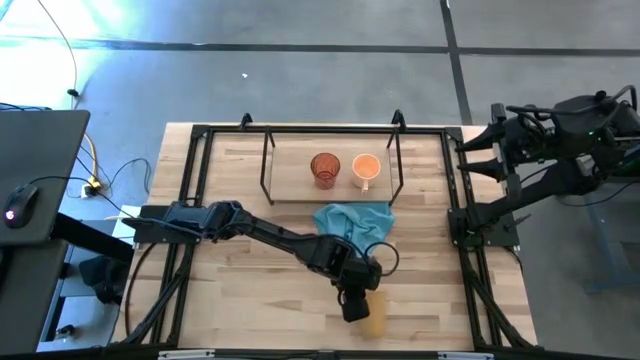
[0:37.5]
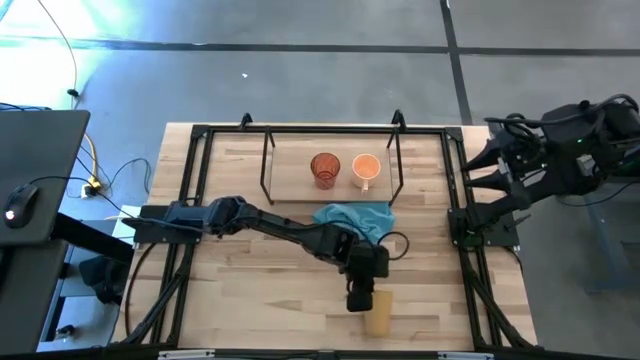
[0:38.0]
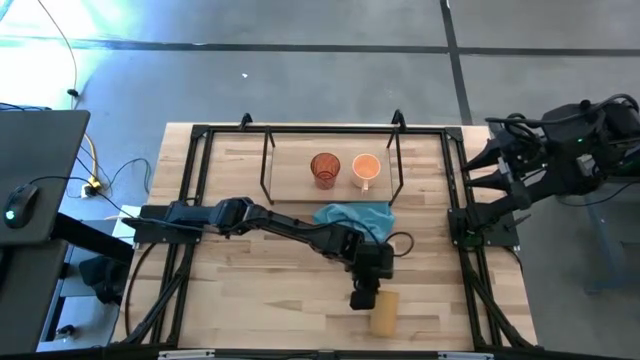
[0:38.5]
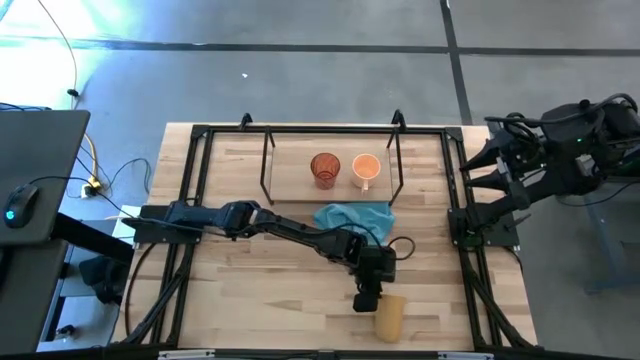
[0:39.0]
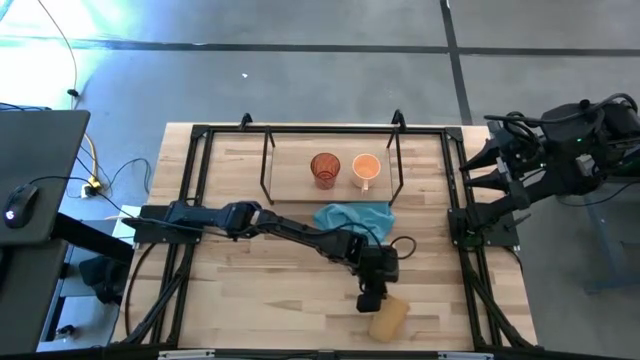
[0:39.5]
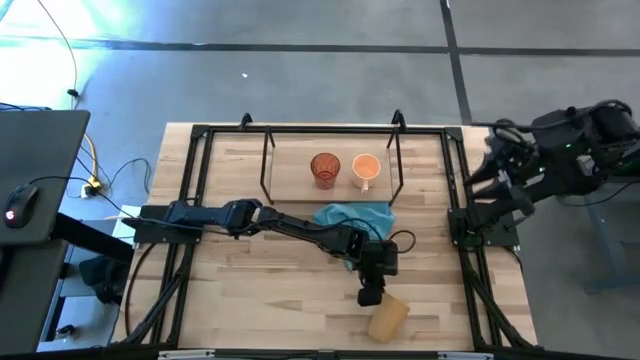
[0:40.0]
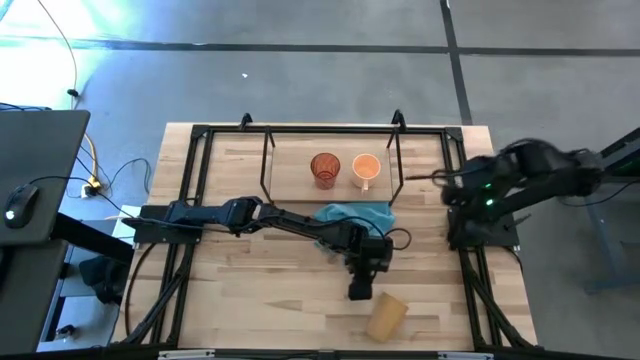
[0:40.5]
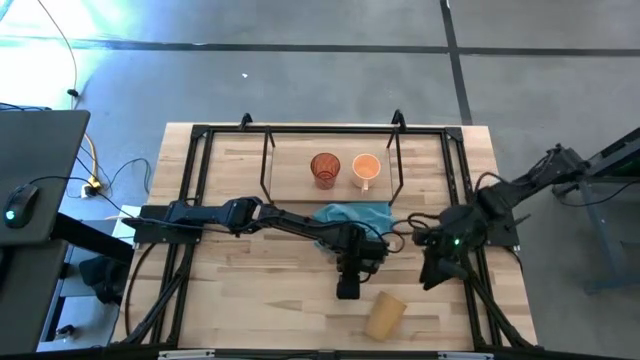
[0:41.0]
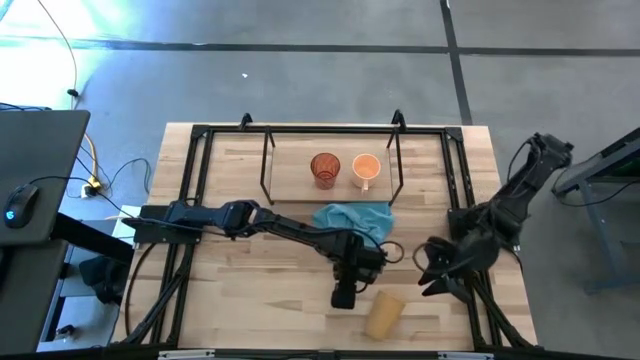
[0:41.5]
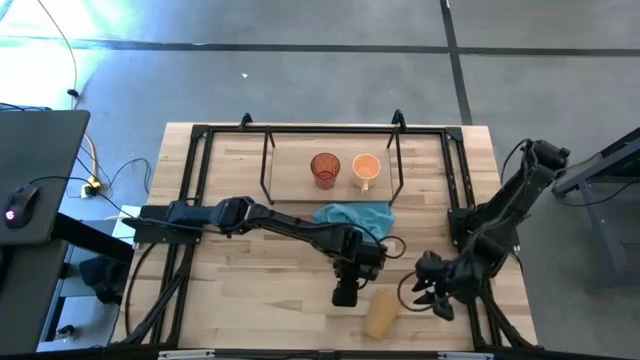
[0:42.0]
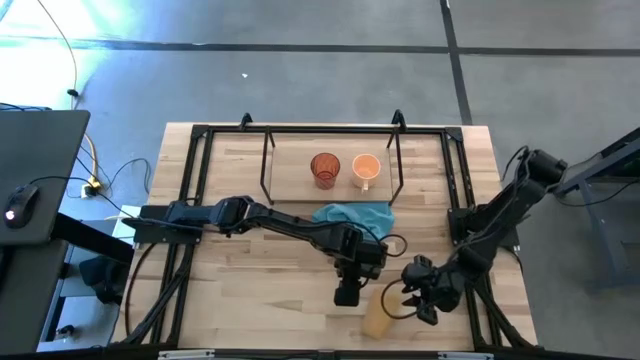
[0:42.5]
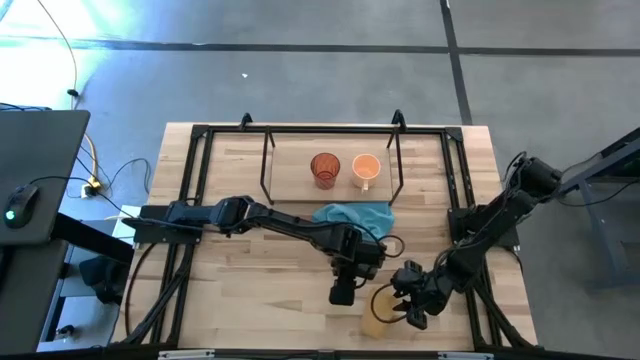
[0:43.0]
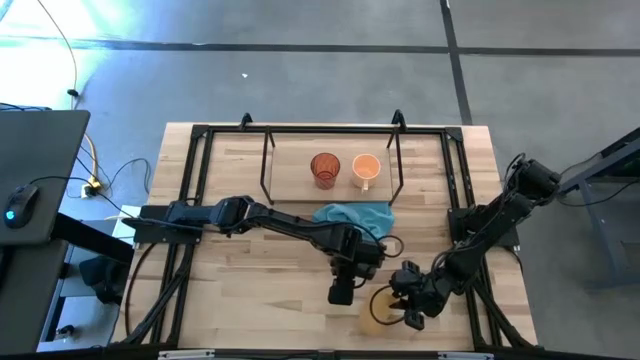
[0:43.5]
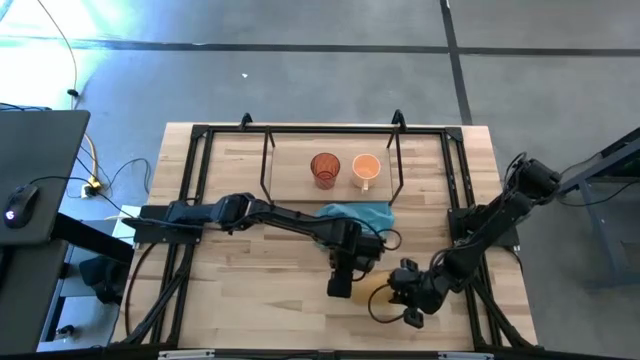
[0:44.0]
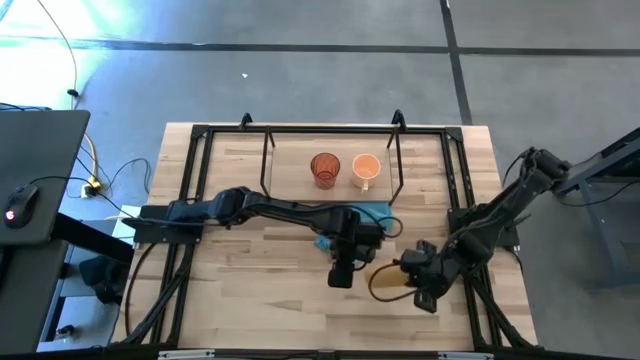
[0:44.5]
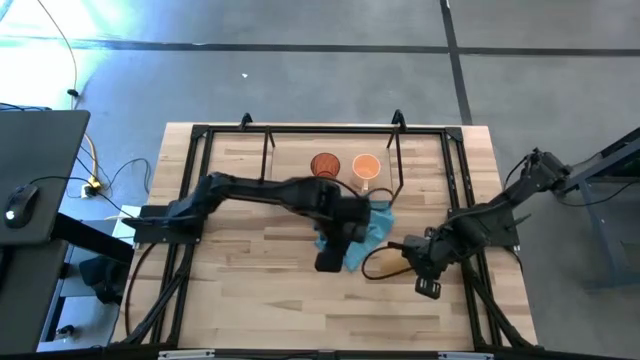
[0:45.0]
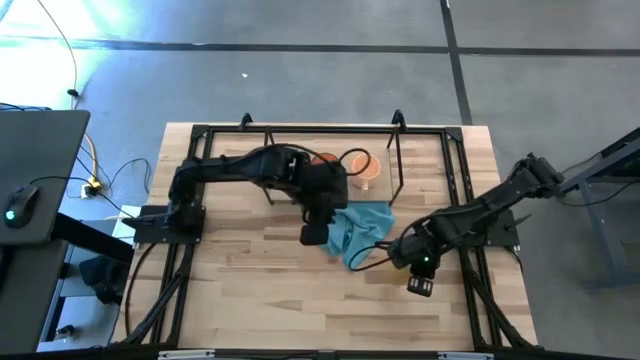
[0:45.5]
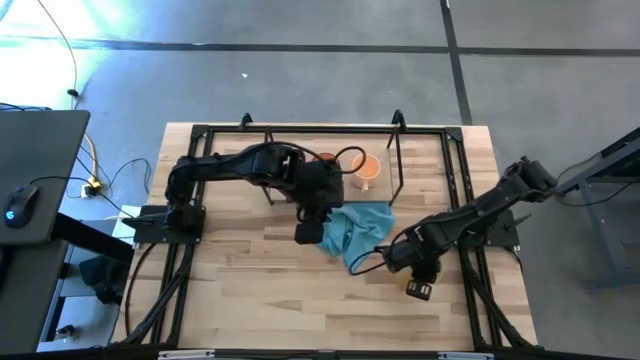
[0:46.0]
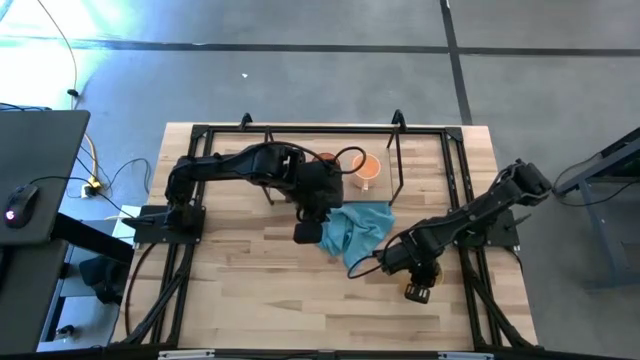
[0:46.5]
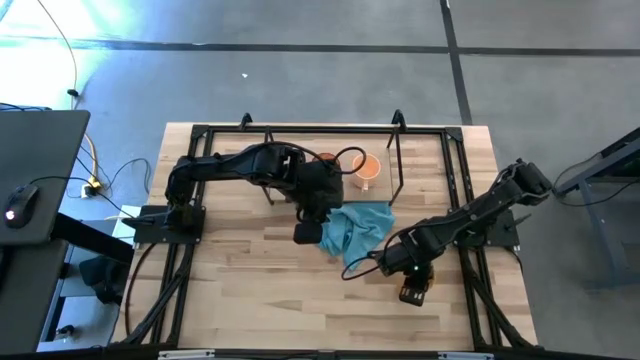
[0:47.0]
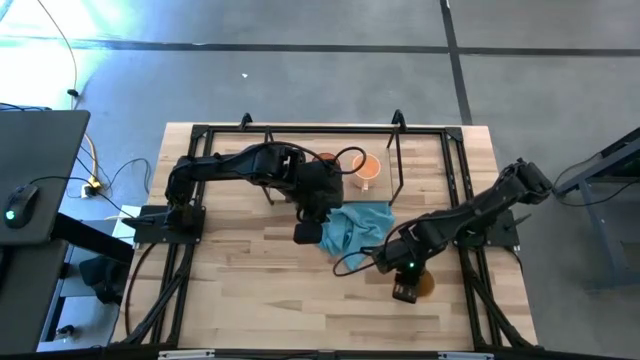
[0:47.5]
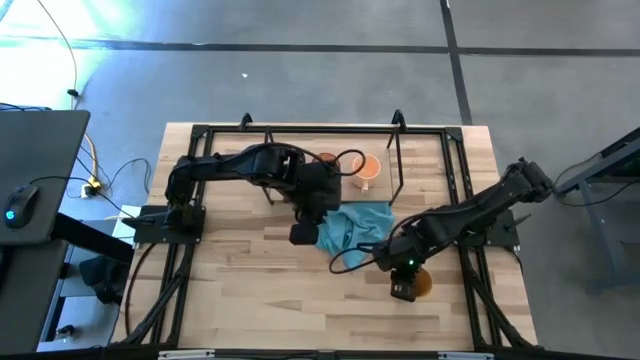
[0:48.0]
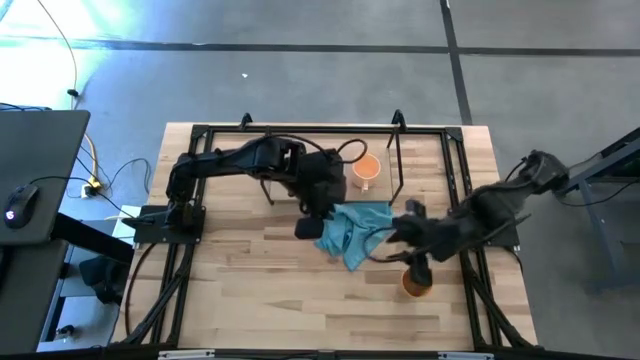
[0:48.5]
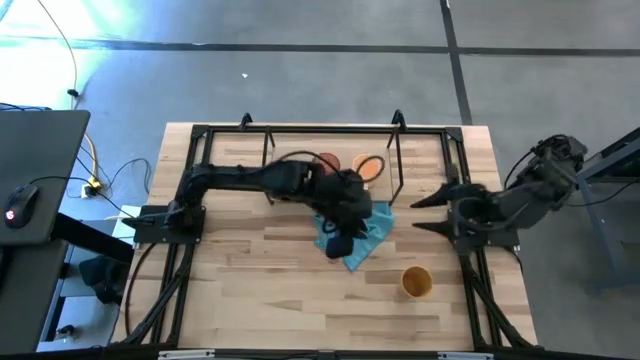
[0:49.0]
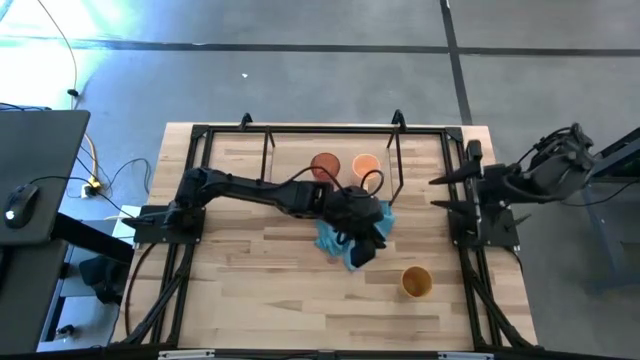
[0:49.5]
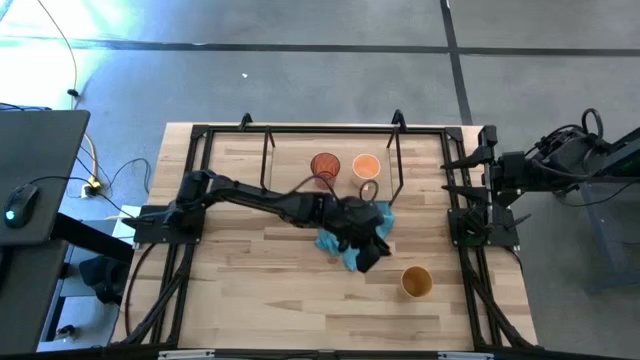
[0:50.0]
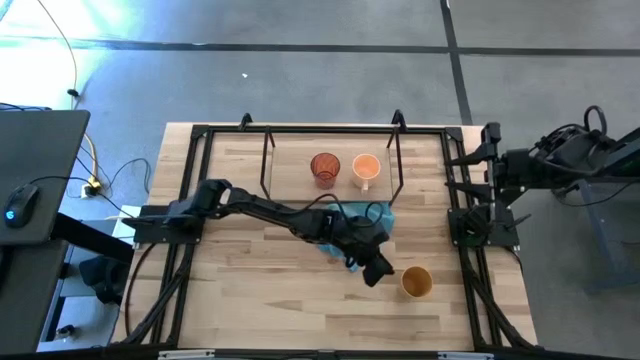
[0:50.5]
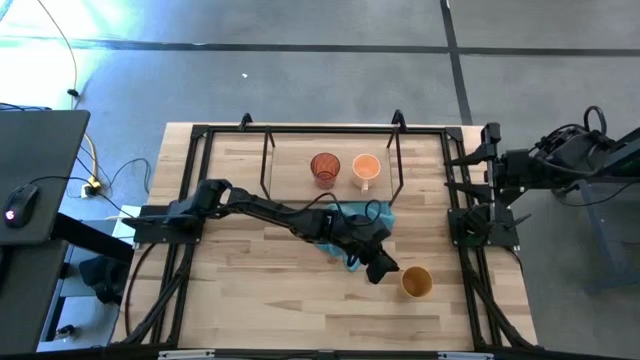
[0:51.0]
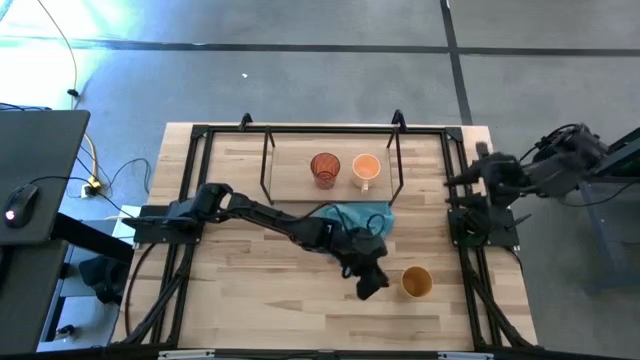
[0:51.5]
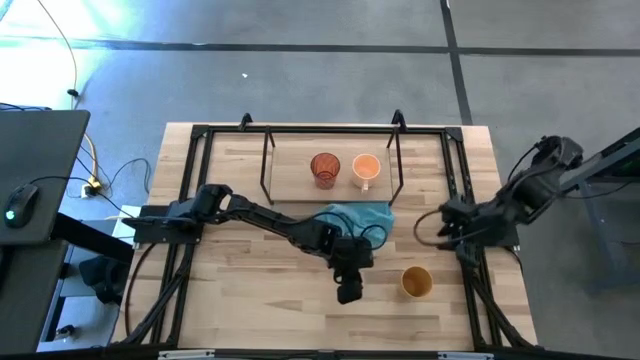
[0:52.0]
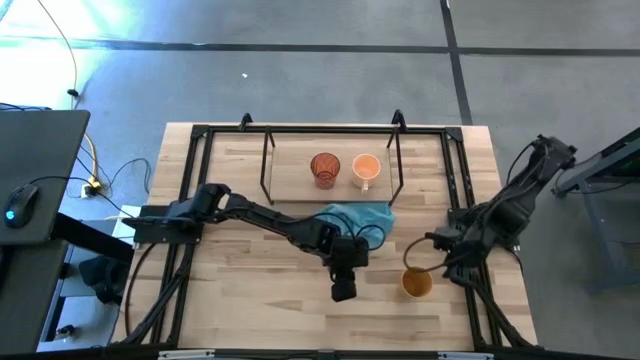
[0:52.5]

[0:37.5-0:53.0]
Task: Stack small to large cups/mugs on shelf
Put the yellow cup on the shelf

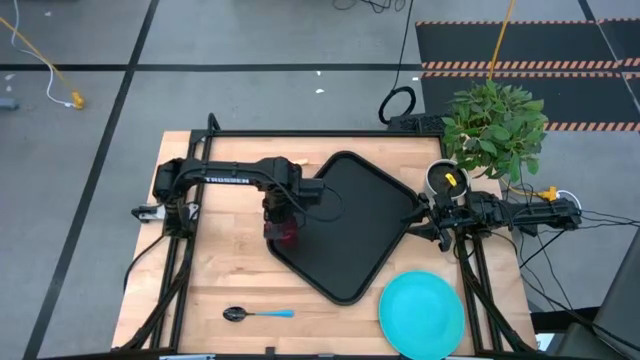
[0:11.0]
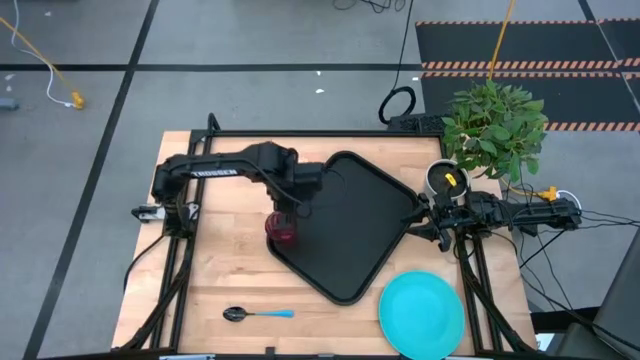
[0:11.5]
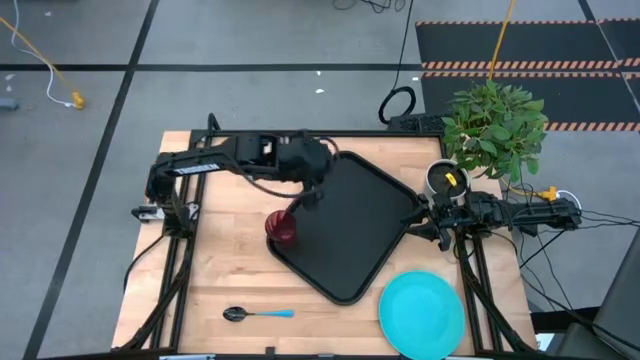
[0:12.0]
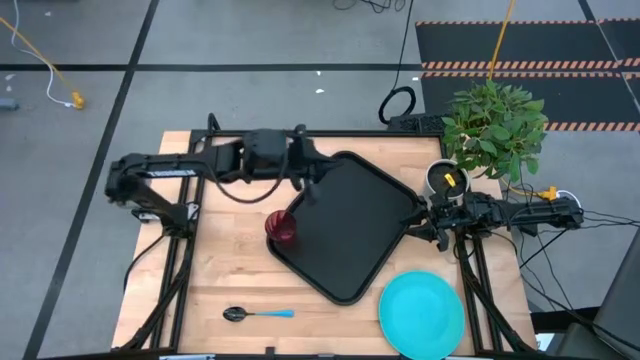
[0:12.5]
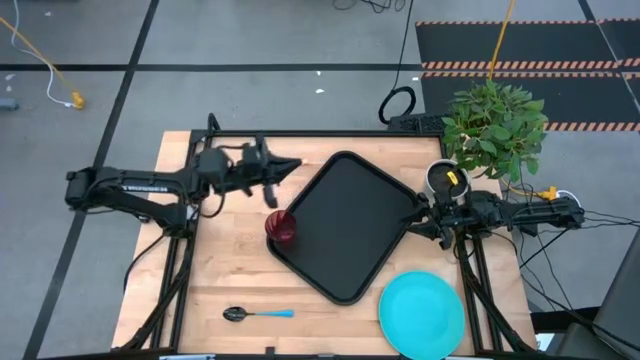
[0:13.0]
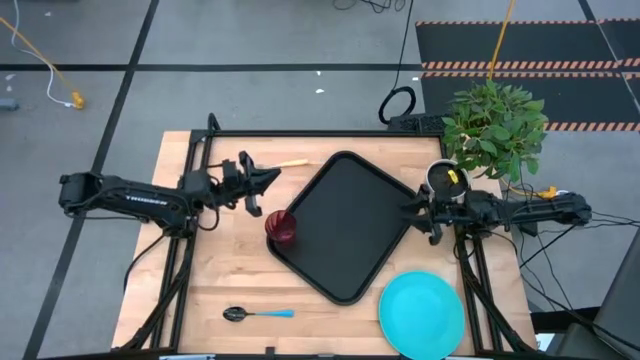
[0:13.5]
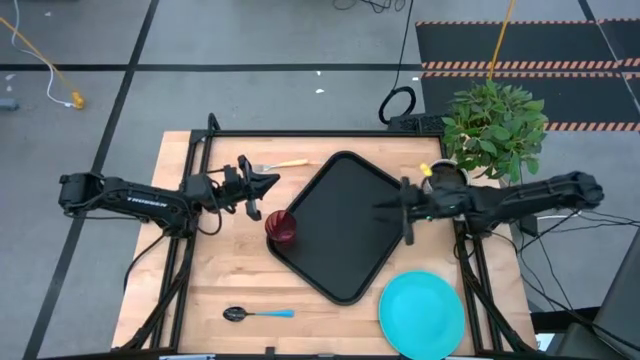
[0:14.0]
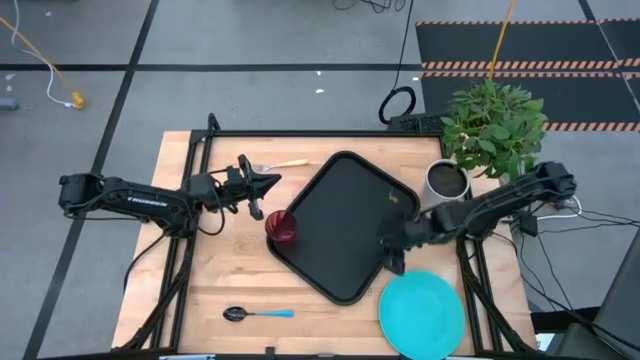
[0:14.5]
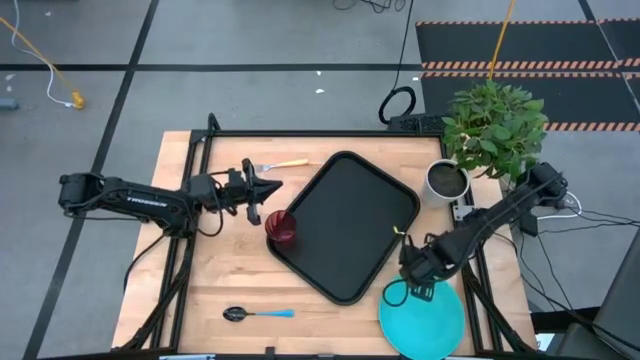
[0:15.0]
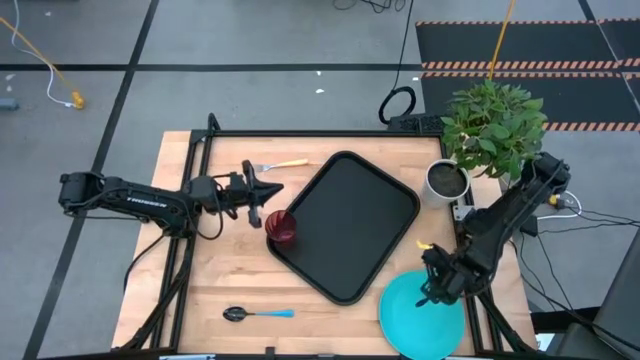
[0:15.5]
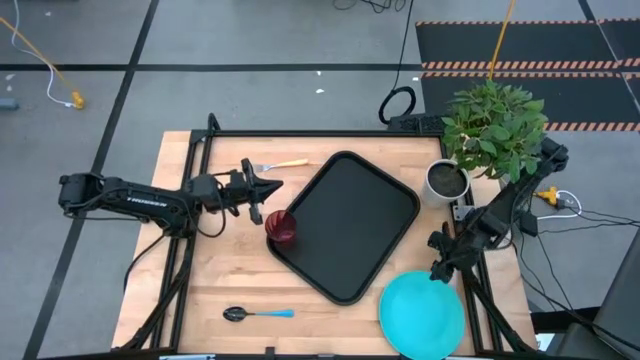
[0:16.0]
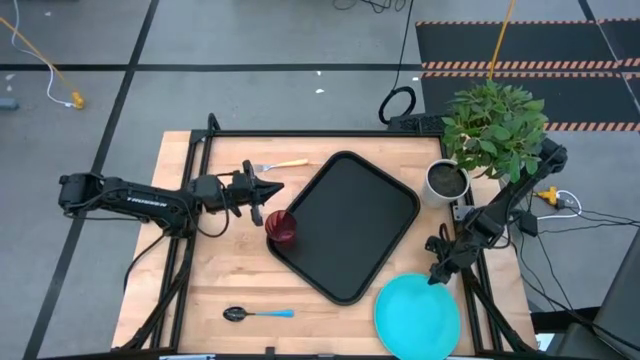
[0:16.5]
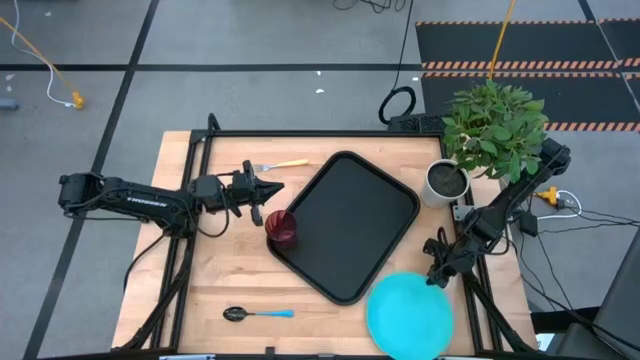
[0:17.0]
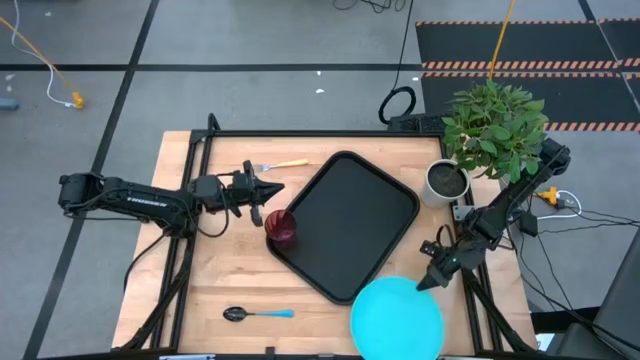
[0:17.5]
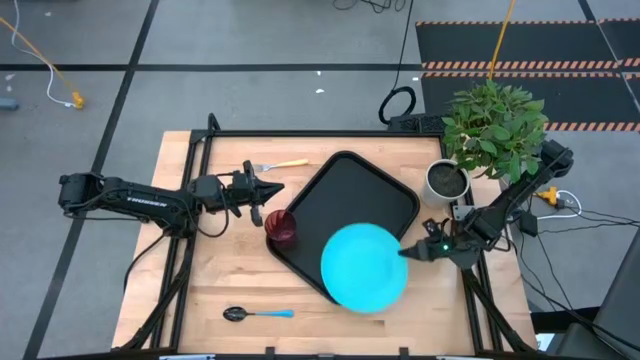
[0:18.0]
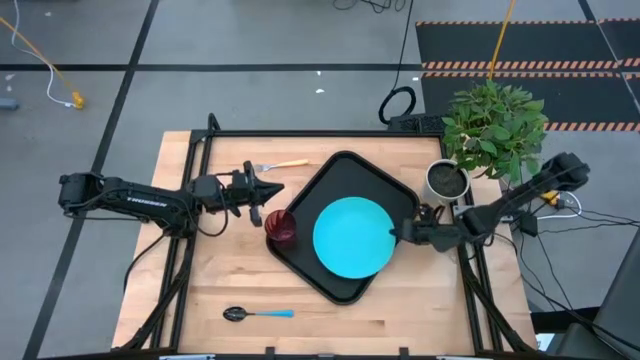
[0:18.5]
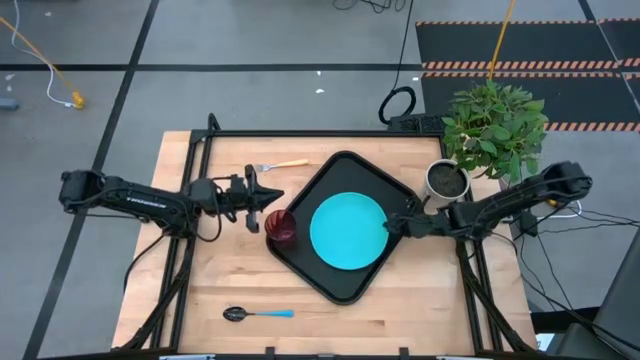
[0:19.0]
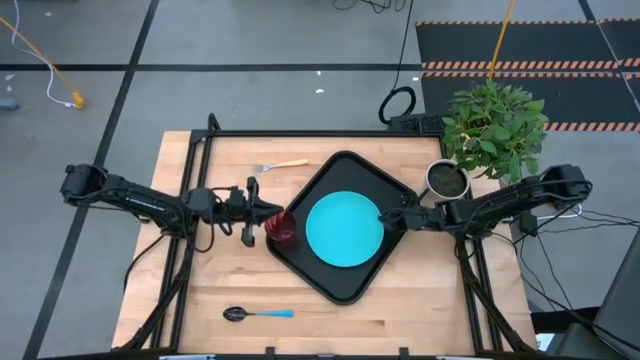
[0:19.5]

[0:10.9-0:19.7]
Task: Pick and place plate/cup/fork/spoon on tray
Put the blue plate on the black serving tray
